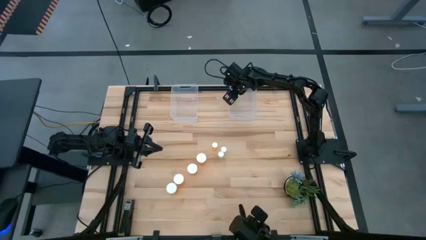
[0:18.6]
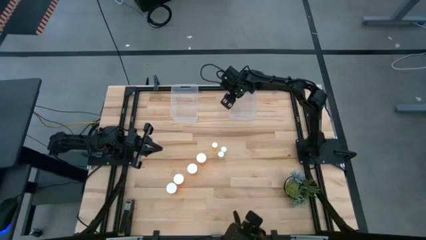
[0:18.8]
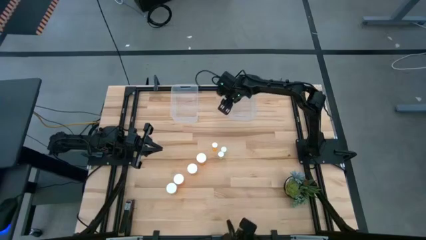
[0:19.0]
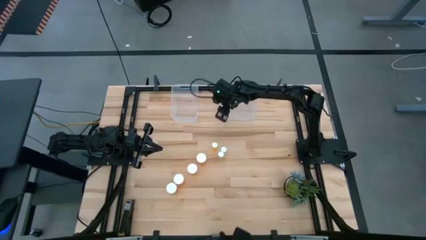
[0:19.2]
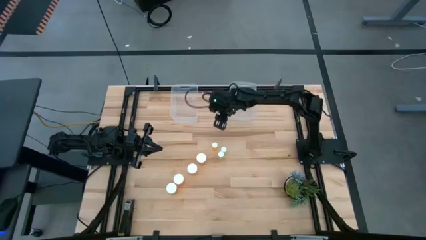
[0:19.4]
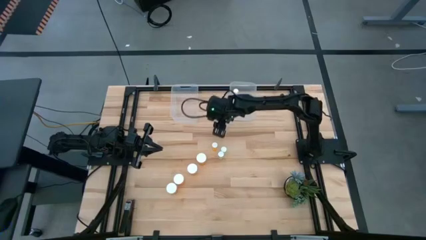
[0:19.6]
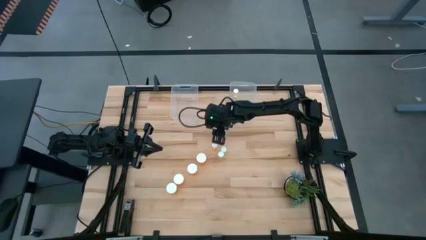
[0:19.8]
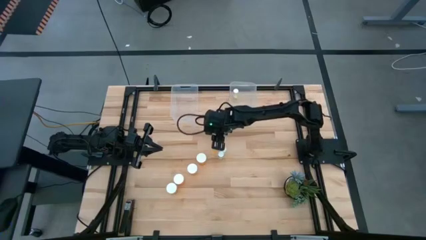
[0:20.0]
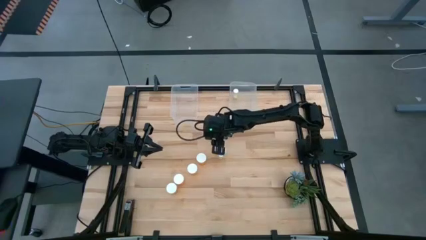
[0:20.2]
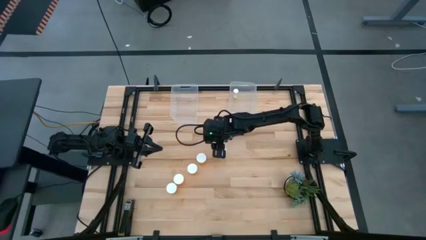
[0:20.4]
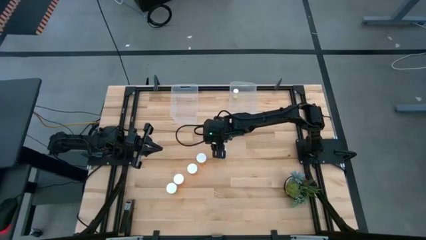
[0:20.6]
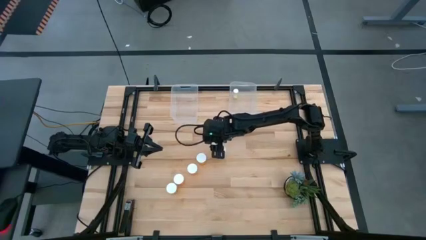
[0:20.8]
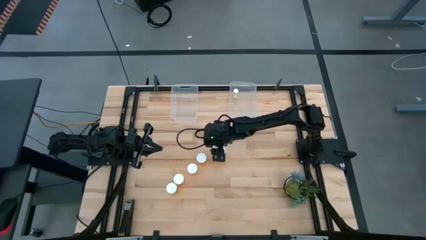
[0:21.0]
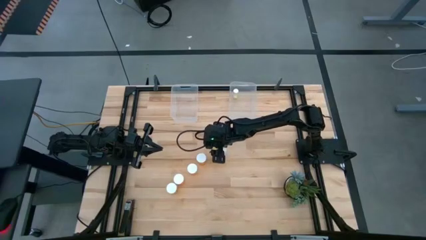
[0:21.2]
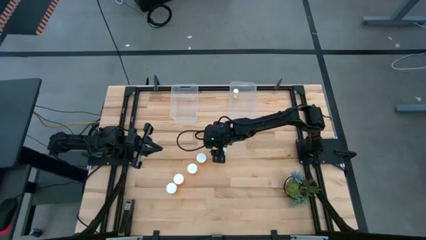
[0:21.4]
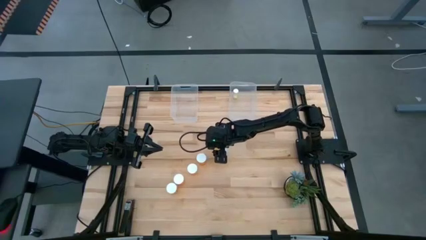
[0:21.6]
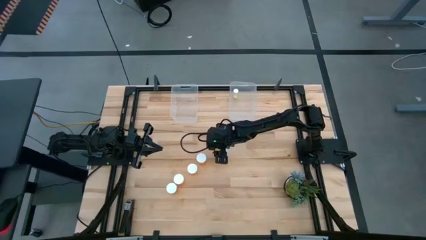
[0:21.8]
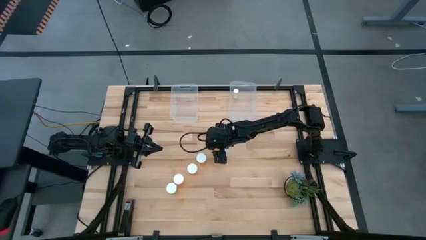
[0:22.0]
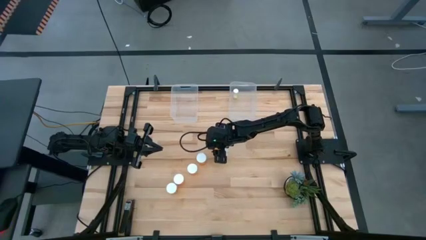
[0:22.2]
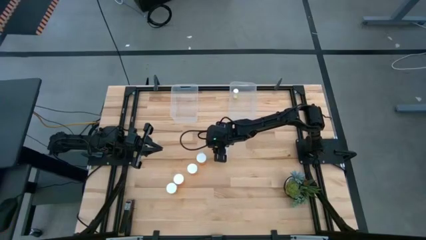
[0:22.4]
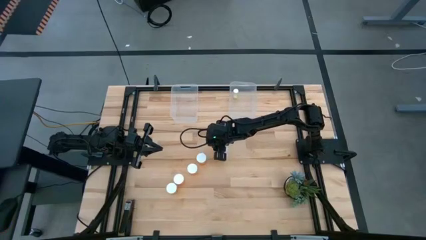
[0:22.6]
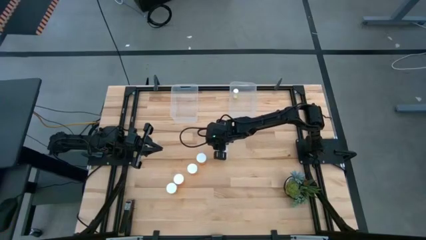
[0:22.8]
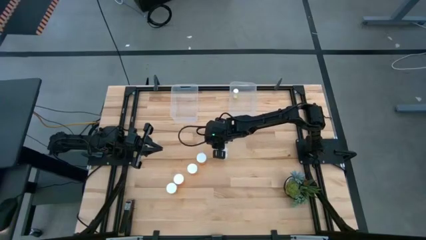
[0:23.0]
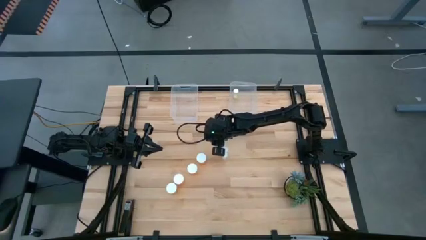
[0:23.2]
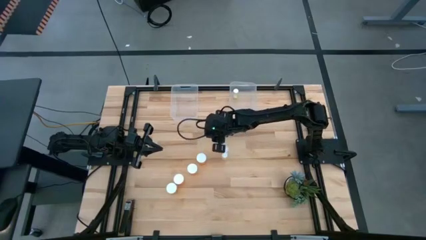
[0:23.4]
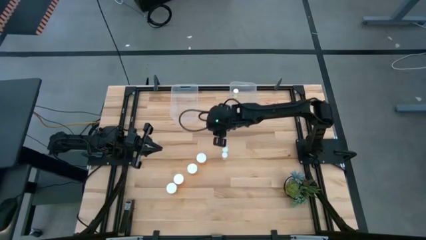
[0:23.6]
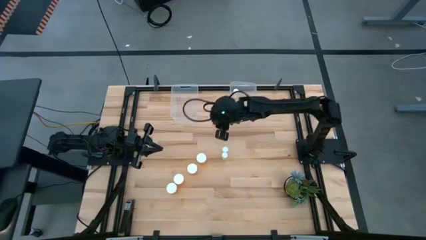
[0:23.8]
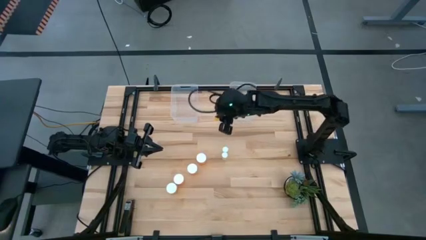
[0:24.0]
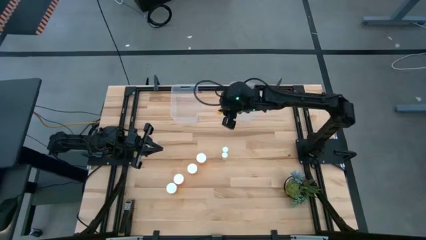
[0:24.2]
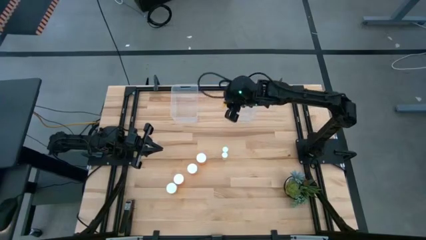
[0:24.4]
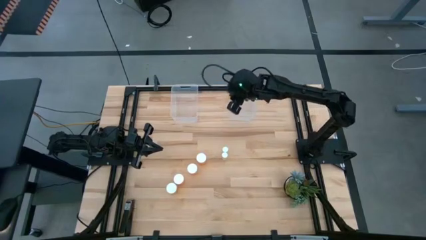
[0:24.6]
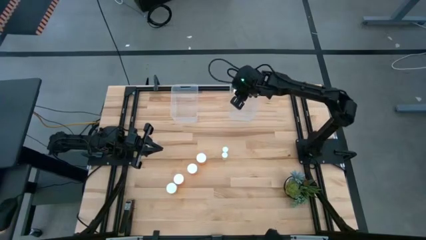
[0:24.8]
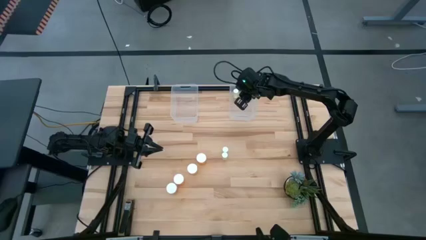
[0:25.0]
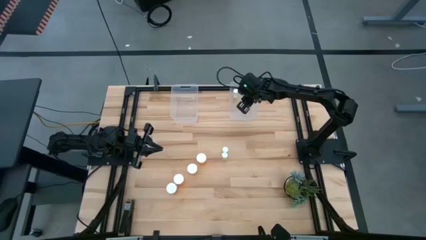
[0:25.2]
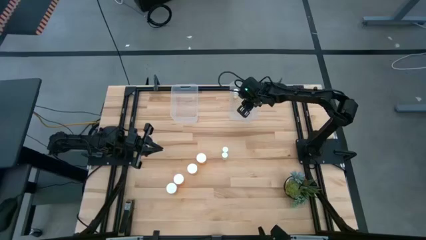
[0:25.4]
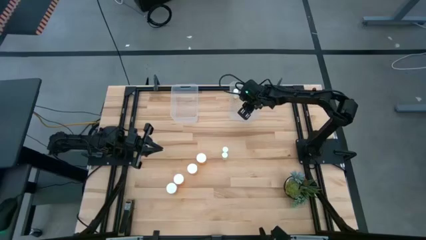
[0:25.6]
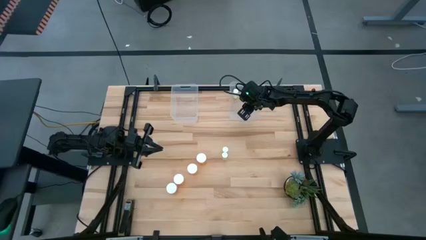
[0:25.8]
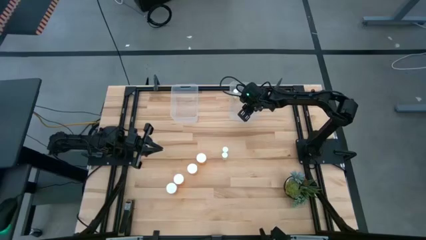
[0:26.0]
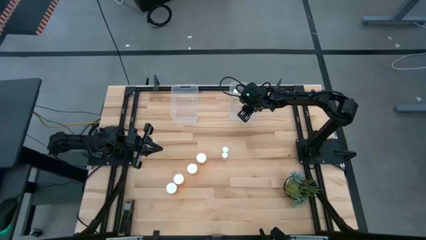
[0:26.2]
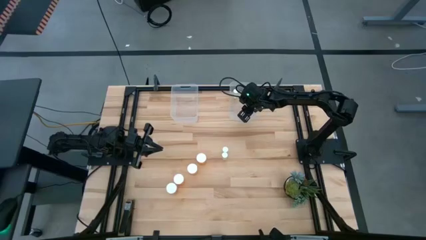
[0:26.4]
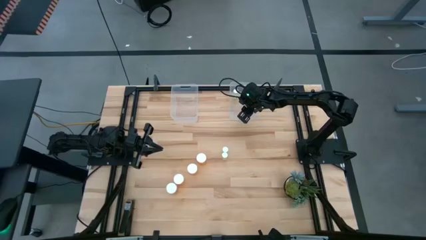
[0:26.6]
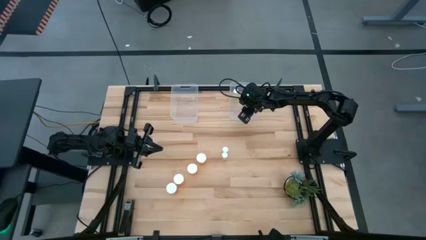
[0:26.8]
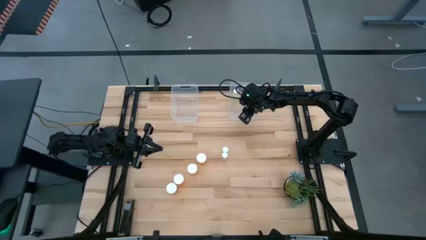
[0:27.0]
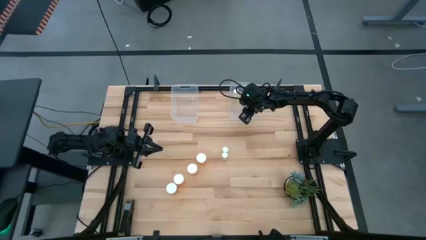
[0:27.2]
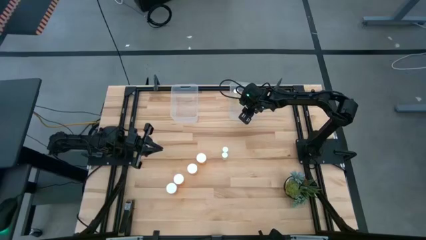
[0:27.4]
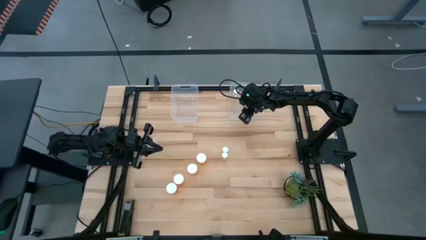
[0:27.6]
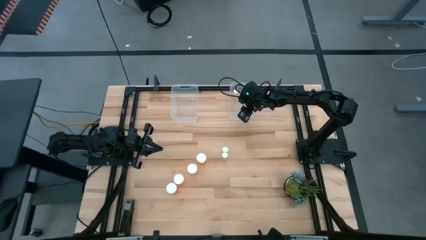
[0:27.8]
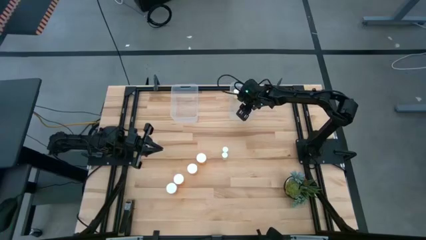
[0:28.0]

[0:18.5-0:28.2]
Task: Pick and place medicine bottles into bin by pill shape (circle, oval)
Put the top small orange pill bottle into the right transparent bin

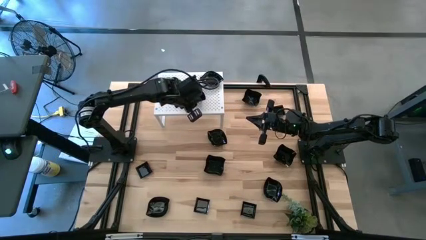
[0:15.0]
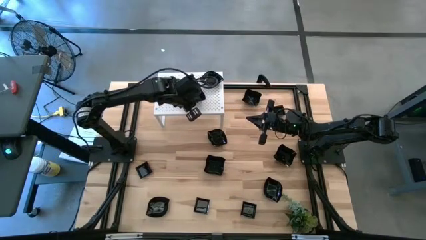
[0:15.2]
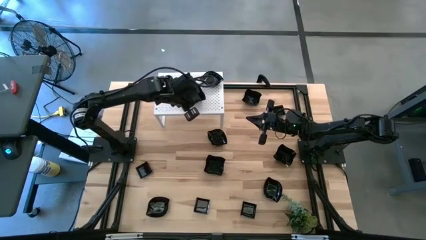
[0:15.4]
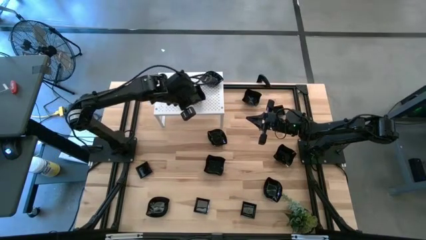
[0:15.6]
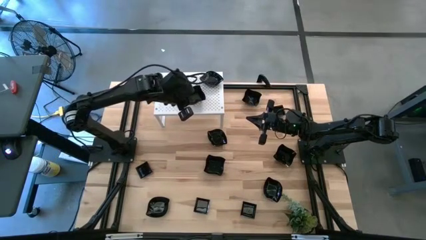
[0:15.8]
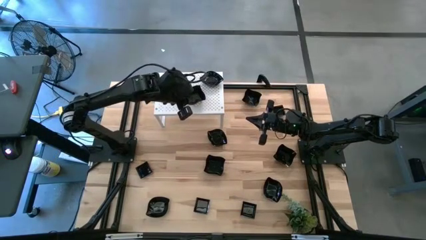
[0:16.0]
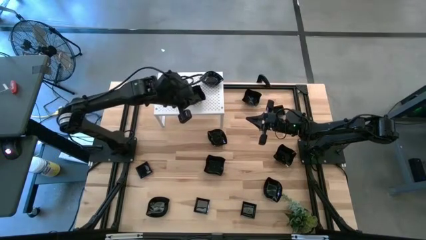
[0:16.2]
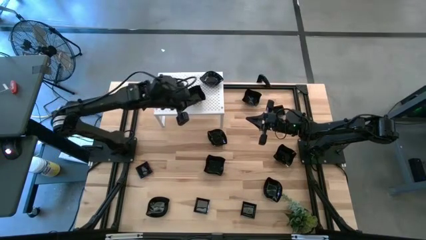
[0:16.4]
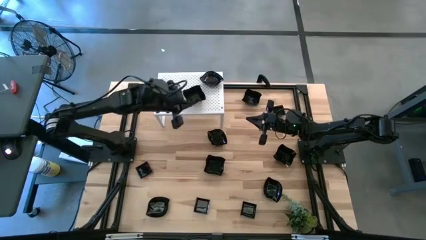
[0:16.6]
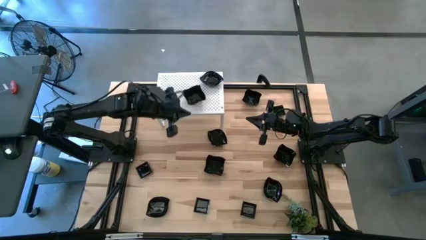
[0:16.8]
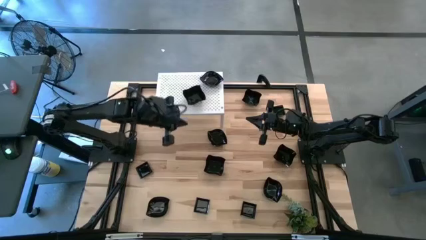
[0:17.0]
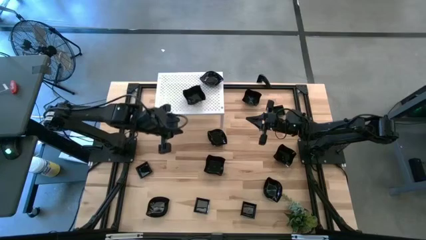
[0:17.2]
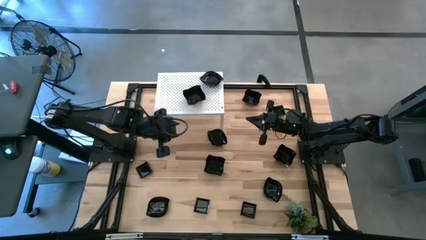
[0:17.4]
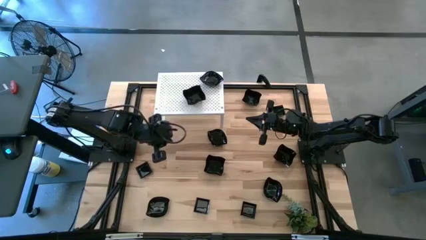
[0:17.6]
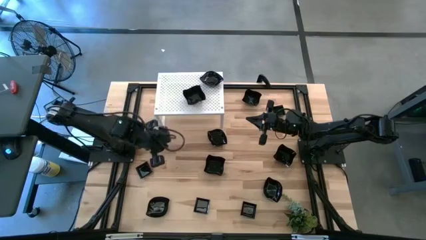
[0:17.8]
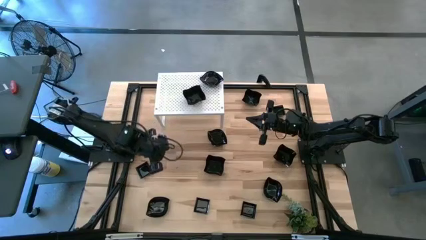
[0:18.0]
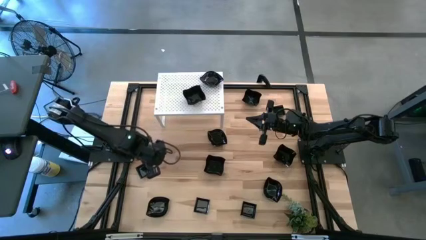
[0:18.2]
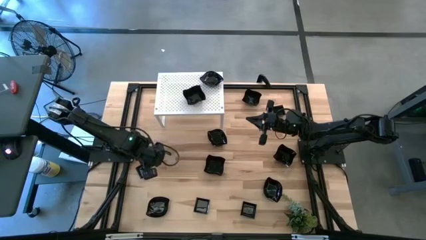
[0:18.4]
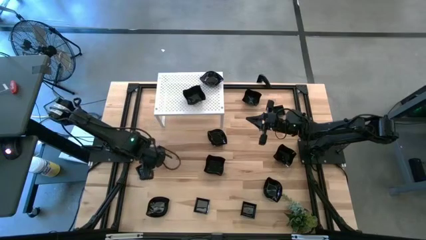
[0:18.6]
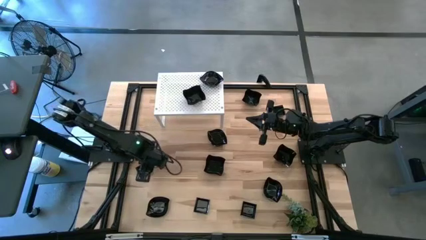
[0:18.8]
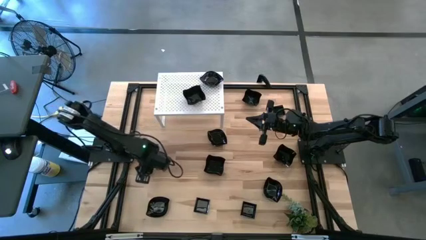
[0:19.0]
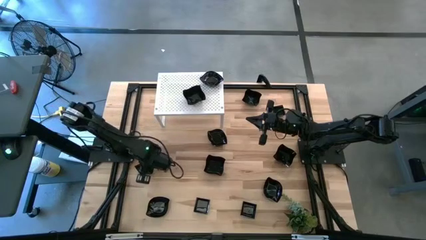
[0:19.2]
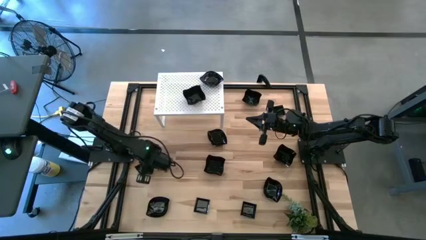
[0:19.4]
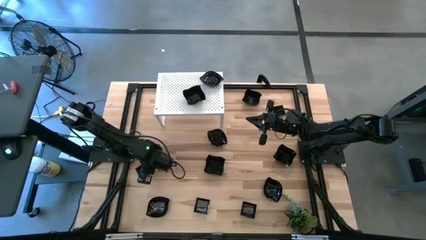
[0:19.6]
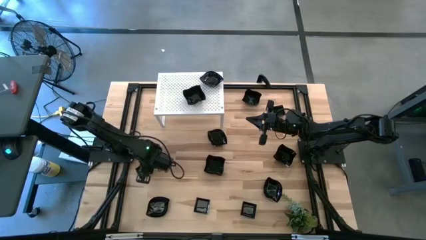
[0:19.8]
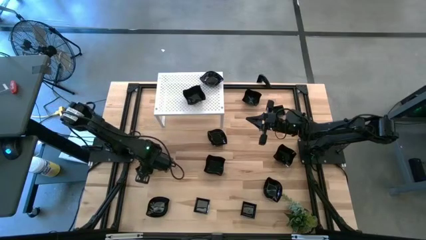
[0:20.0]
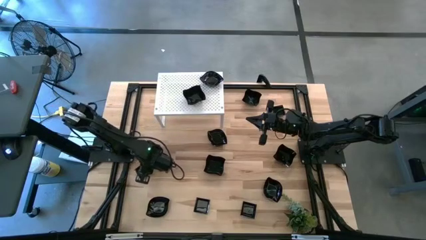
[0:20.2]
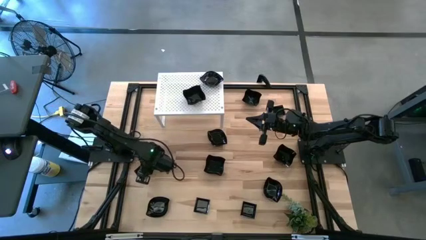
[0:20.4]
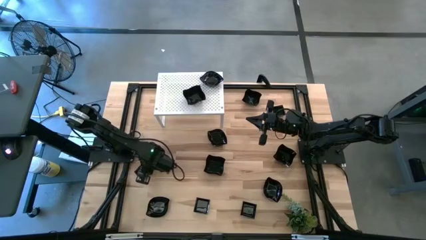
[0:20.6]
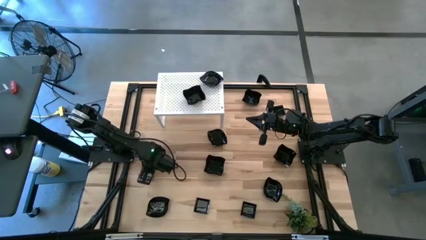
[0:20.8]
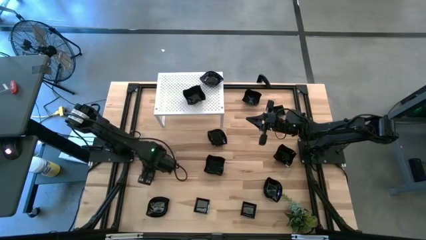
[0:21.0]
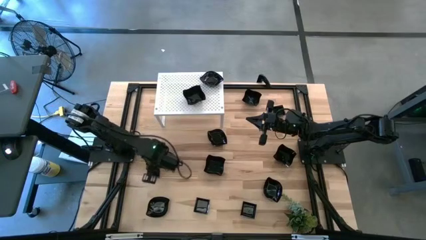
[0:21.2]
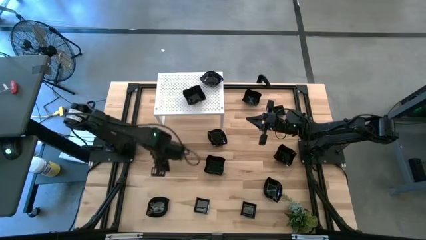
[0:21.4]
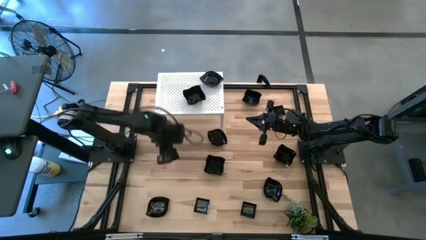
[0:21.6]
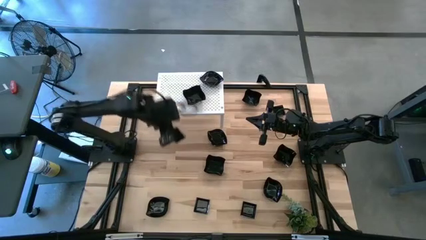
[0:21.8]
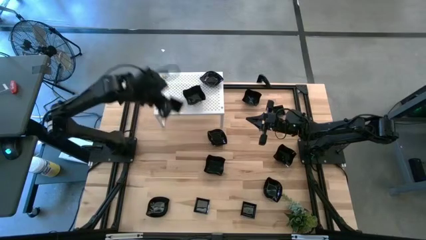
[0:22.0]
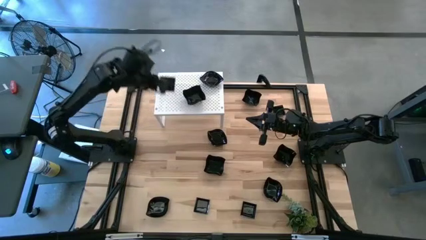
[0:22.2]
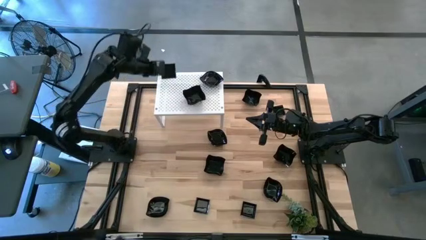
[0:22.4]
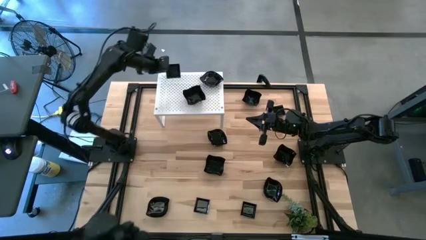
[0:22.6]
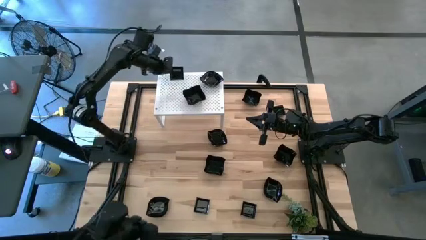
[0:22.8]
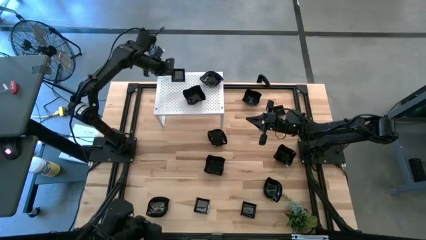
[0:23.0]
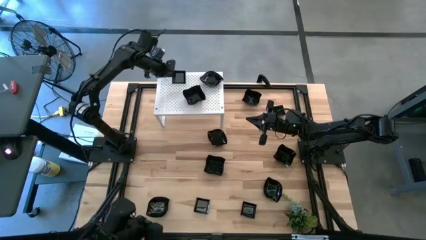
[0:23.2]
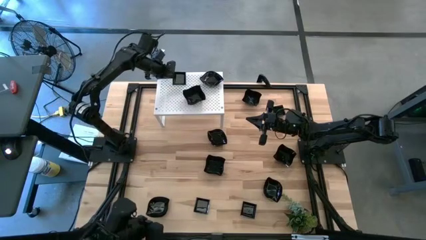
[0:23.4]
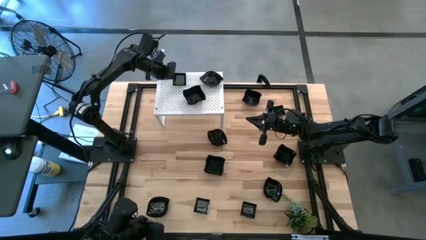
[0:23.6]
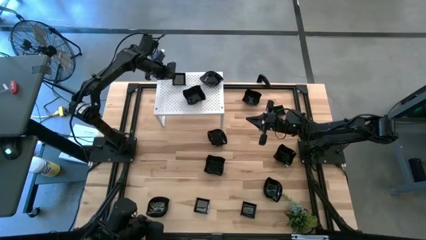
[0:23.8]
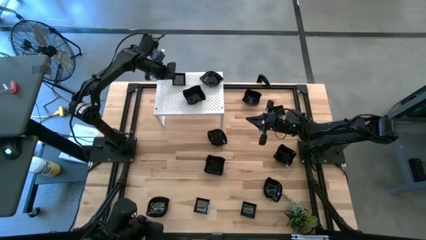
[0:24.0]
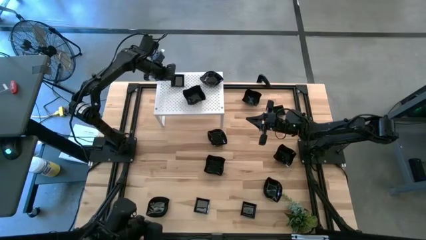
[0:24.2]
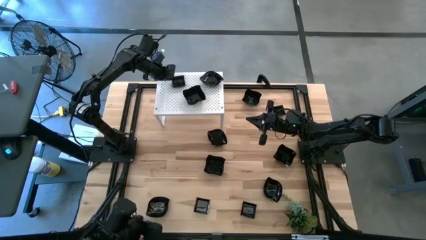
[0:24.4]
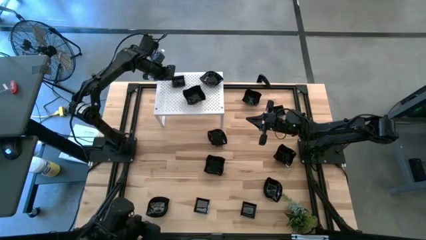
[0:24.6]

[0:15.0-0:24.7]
Task: Pick & Place Mini shaped plates
Put the black square plate on the shelf
